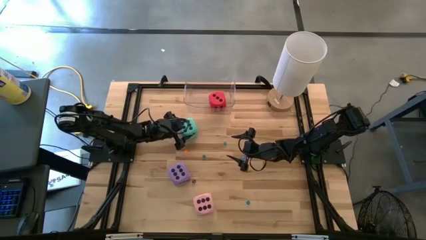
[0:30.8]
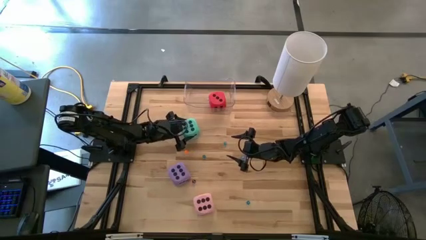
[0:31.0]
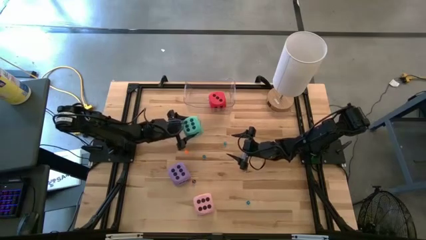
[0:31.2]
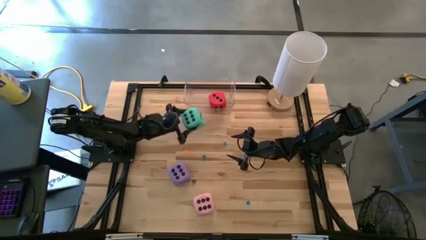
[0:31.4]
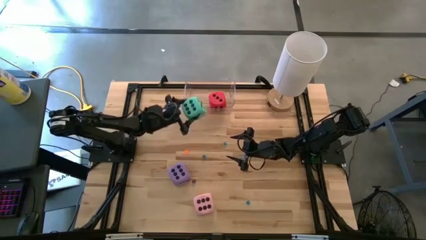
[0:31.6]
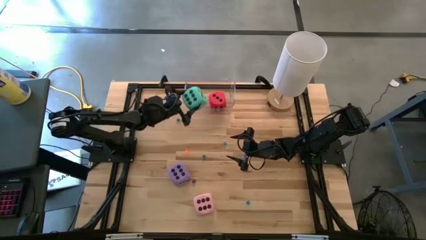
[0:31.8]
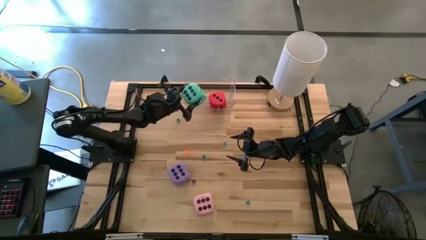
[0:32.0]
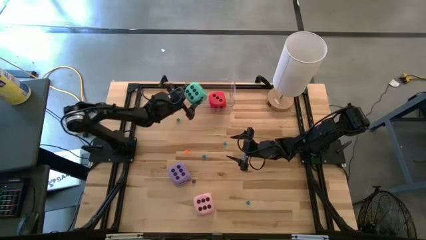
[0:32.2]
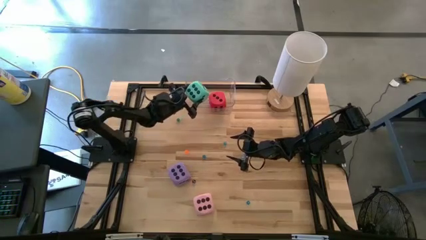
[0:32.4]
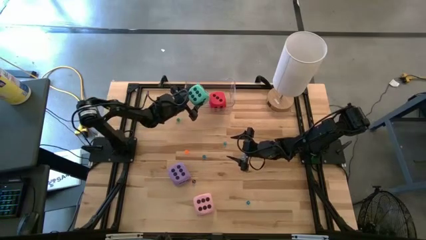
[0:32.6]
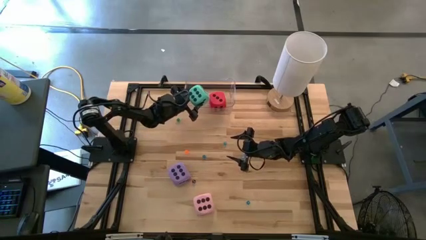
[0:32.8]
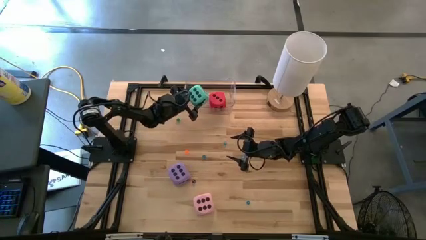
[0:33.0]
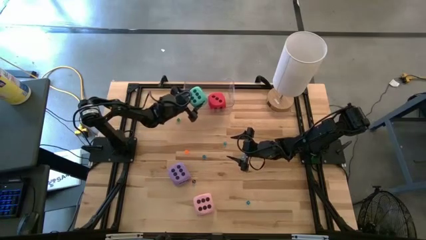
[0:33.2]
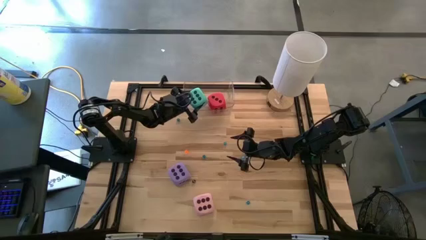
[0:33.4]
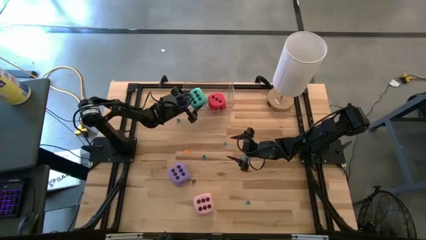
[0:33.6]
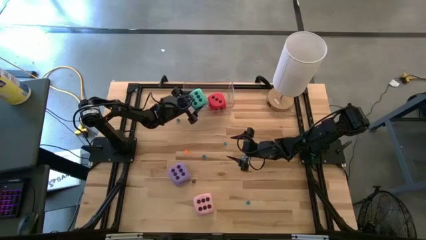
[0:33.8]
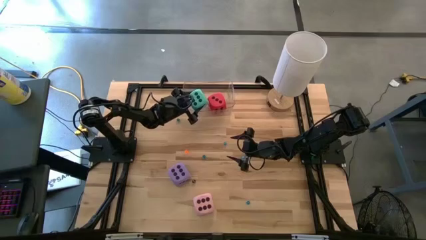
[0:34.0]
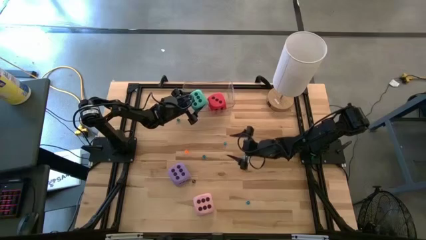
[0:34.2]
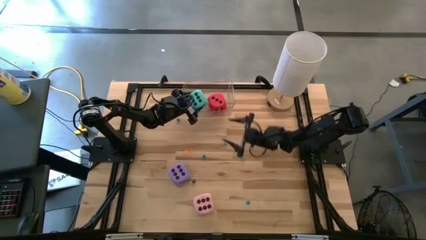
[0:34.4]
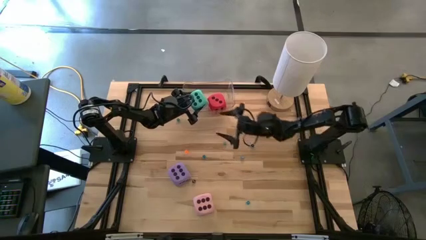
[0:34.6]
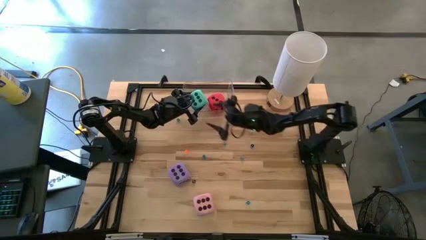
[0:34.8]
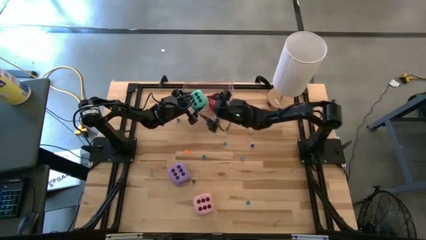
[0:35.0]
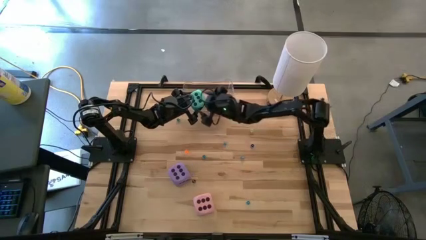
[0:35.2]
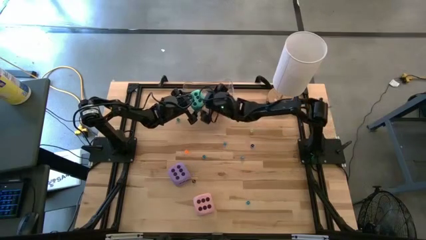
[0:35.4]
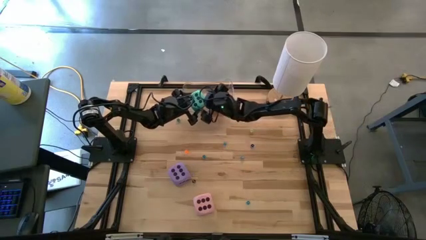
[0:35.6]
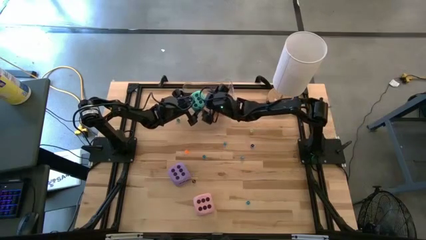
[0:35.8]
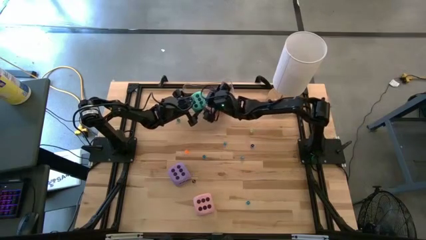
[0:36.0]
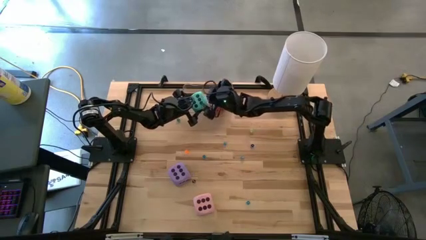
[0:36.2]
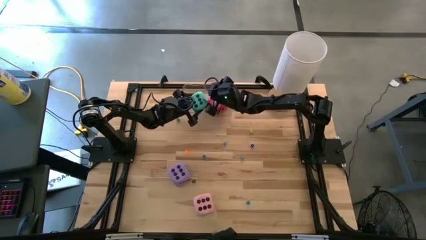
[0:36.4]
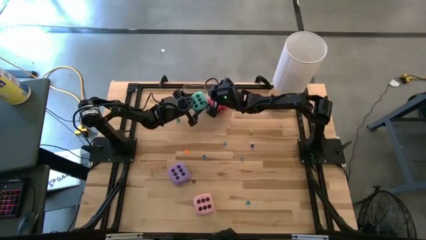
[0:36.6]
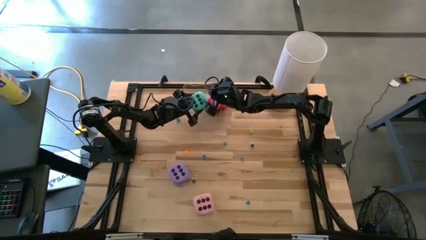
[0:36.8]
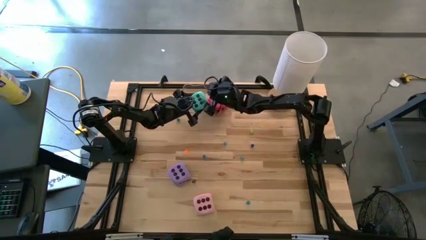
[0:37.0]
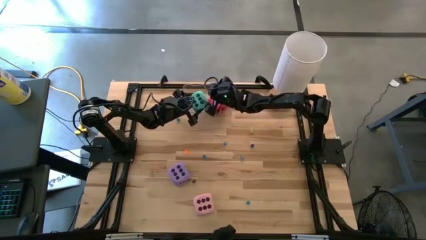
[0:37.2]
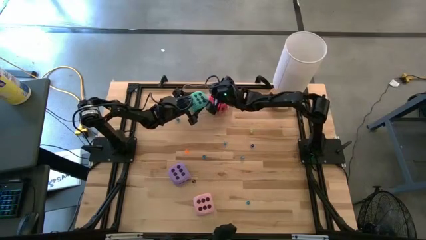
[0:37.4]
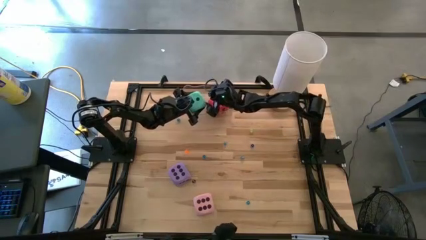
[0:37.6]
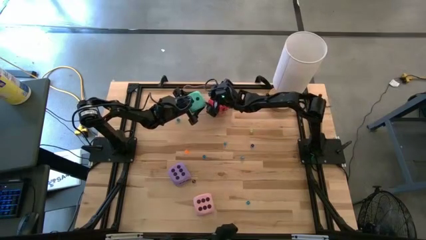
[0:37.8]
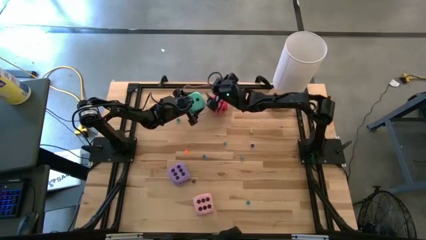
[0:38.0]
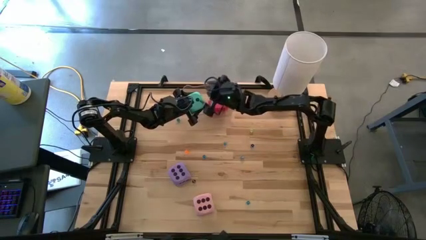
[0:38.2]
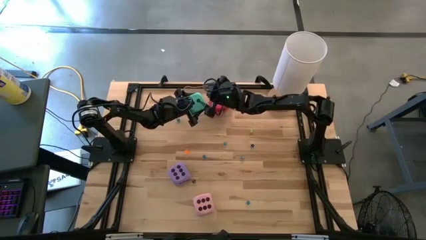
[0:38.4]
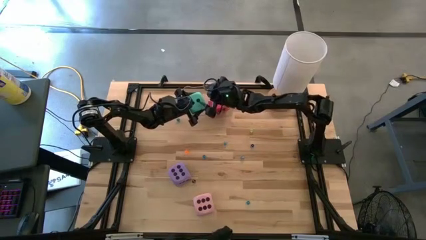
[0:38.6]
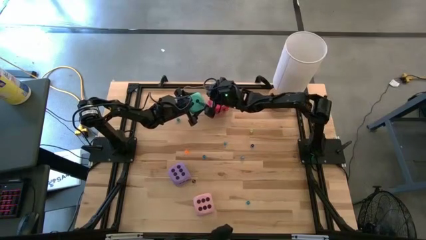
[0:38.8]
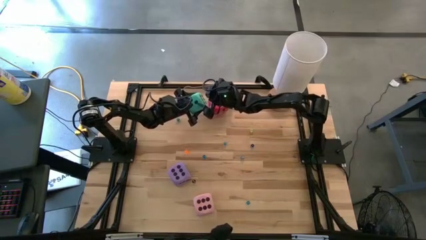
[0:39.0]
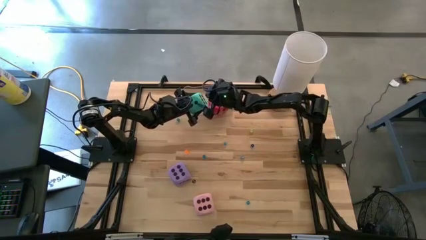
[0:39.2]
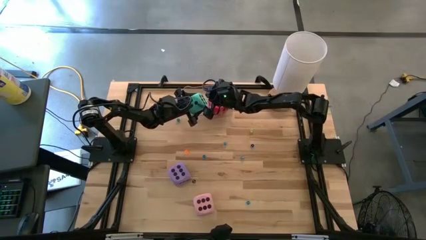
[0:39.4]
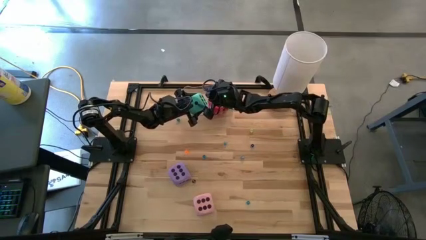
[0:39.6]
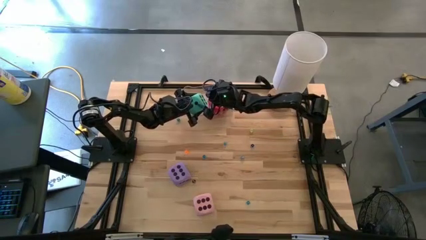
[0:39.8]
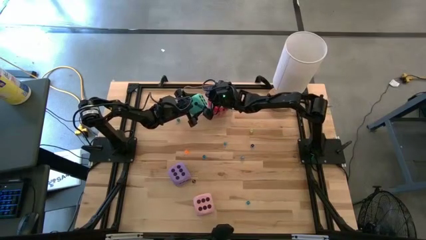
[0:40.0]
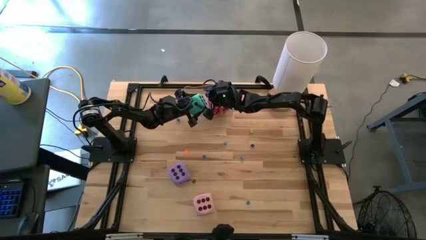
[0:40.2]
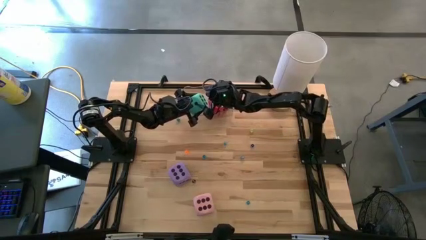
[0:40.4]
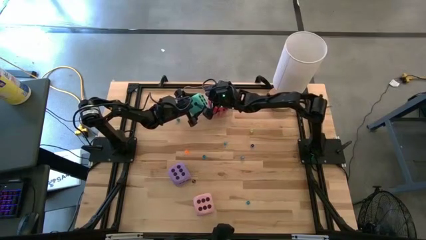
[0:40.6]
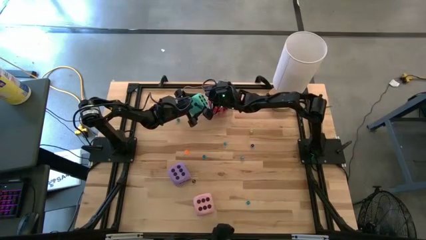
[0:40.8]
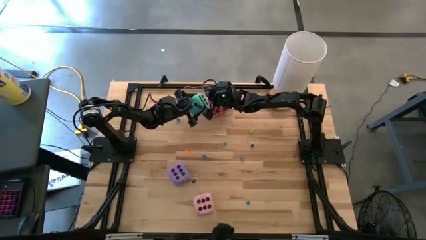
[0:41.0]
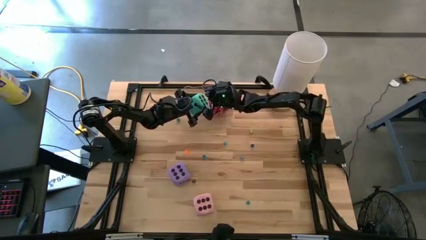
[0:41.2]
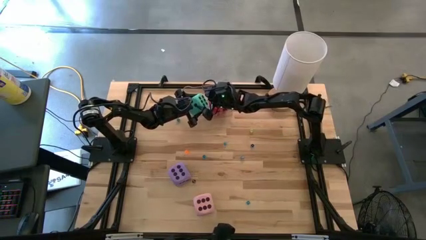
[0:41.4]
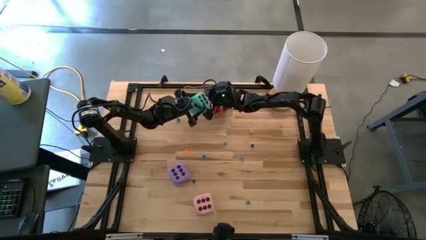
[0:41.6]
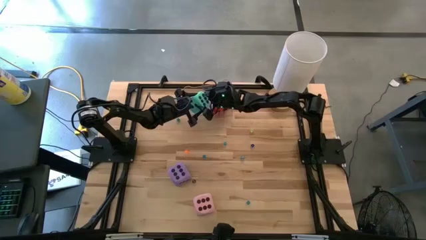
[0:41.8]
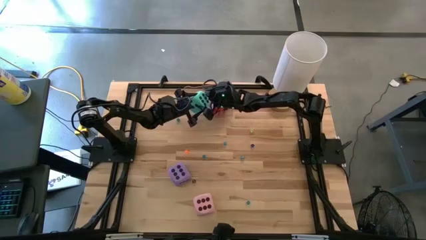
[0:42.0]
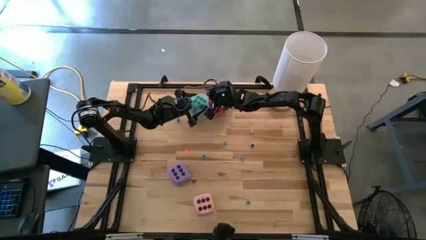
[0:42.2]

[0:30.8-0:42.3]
Task: Pick & Place Dice
Put the top large light blue dice in the transparent bin

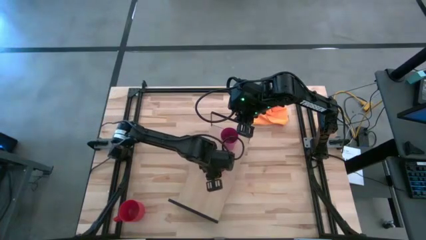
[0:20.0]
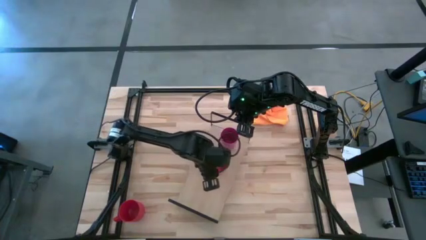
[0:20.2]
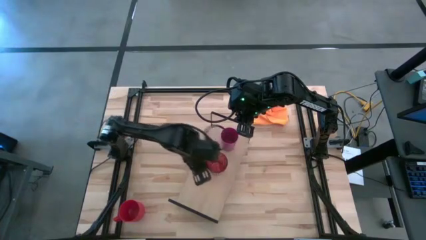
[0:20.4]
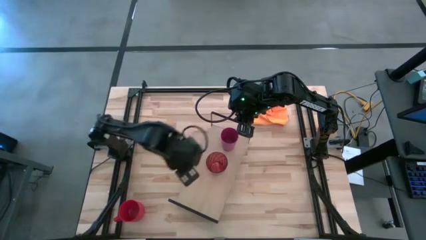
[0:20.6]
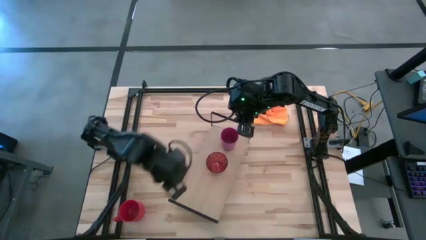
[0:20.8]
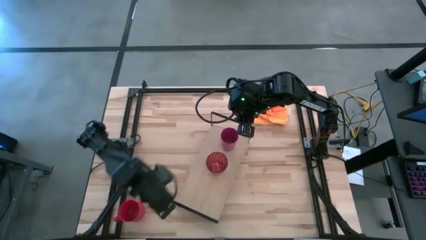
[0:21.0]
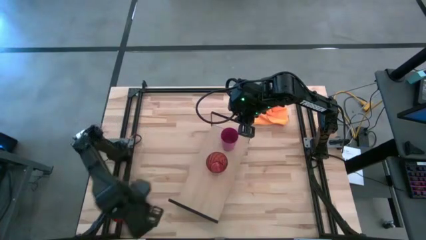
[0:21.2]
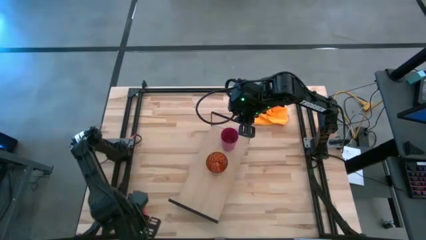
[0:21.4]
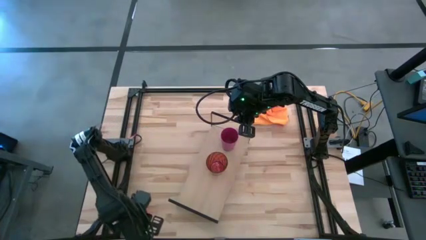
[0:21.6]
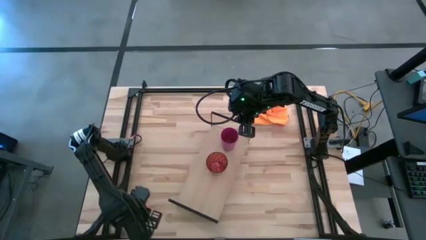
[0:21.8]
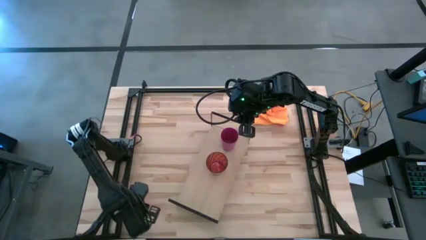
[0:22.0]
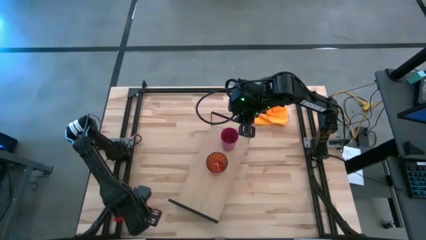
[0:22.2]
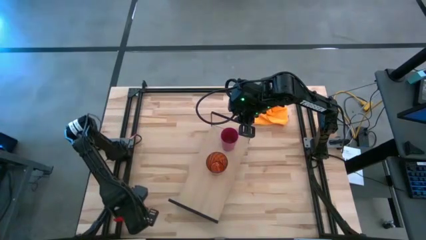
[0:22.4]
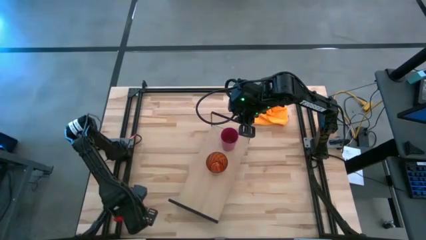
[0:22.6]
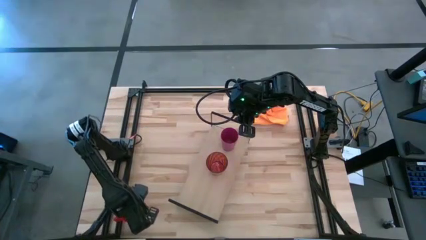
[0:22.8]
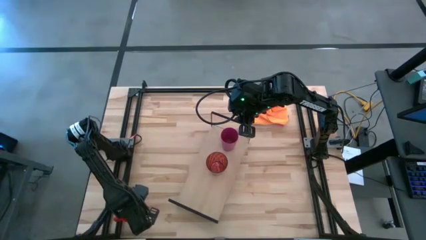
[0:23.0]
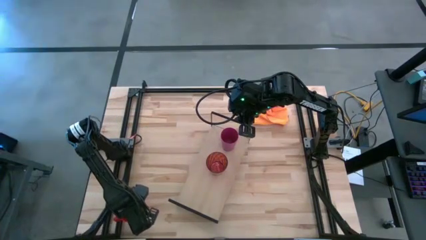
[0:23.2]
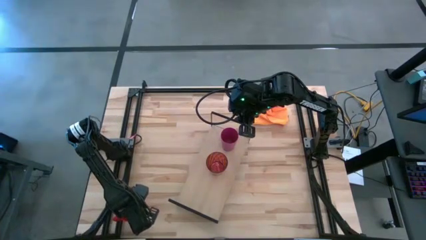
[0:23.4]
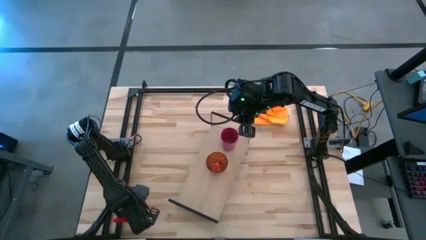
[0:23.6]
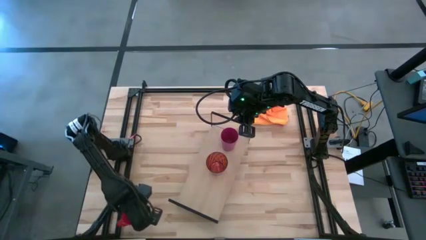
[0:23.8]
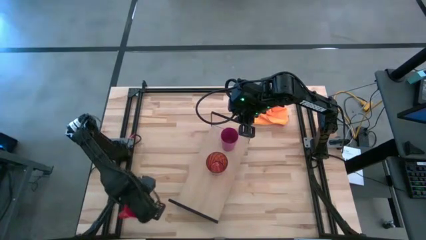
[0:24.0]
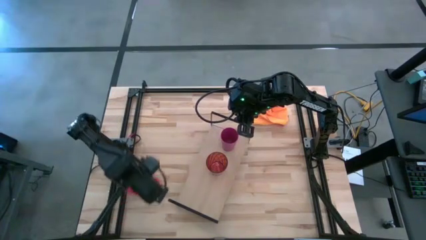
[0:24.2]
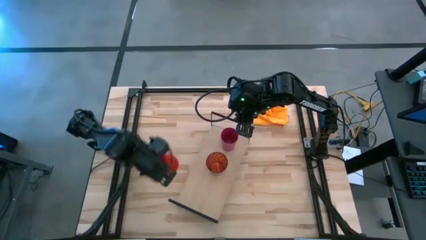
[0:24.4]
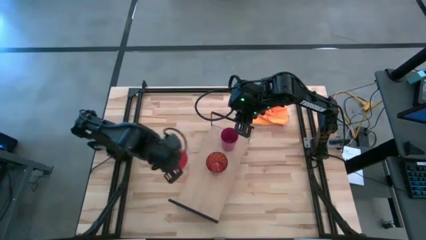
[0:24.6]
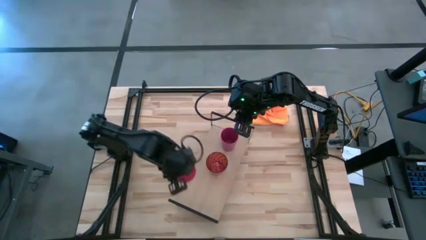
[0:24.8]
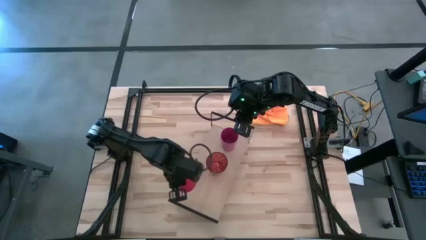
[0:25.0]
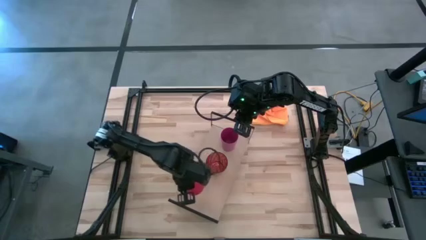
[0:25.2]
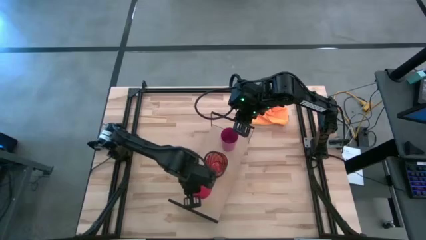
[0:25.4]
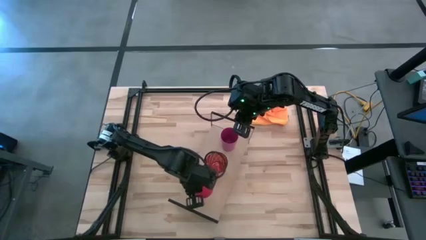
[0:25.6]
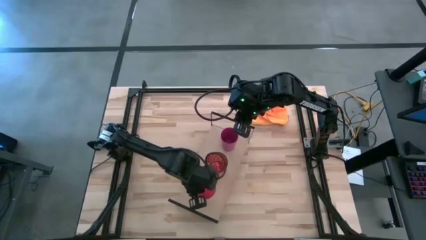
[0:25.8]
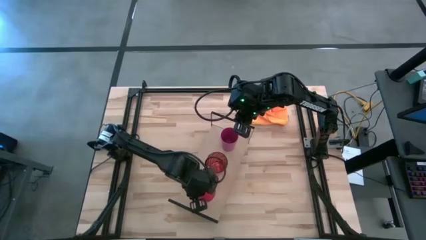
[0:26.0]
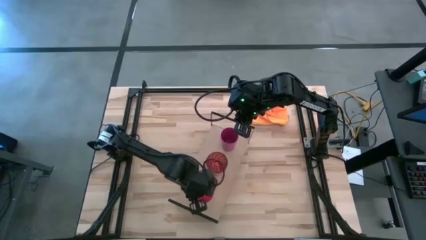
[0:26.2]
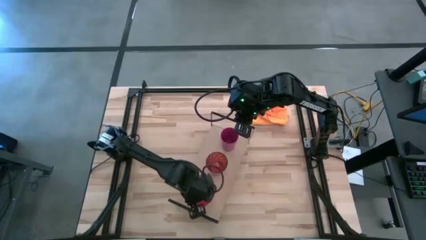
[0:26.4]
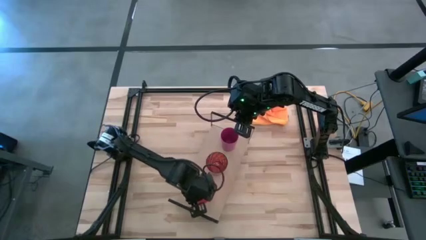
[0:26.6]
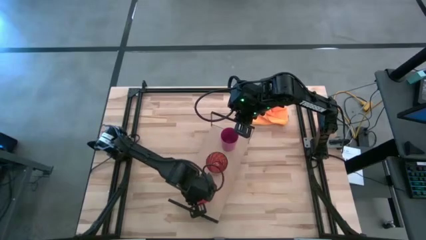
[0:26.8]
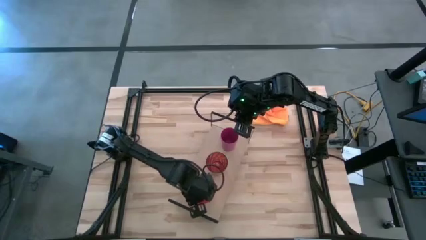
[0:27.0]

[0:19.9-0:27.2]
Task: Stack small to large cups/mugs on shelf
Put the orange plastic mug on the shelf
